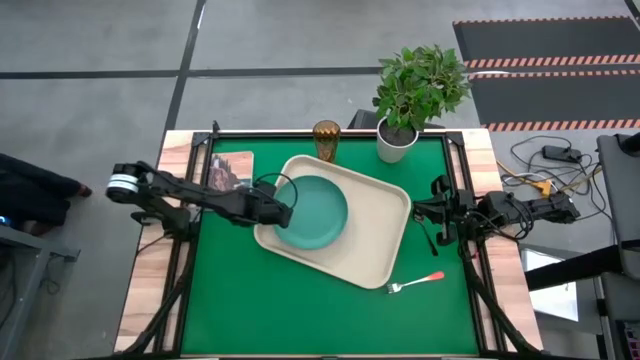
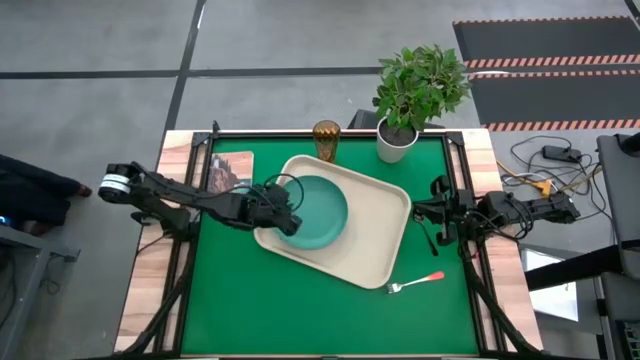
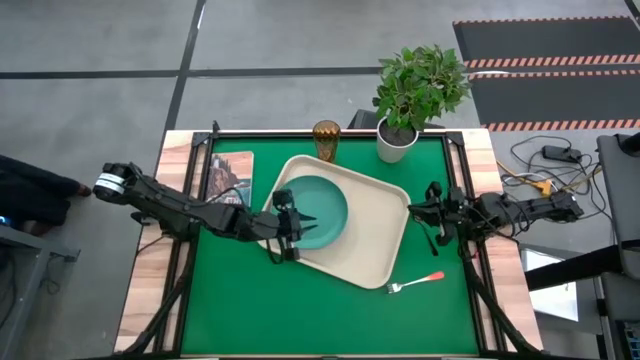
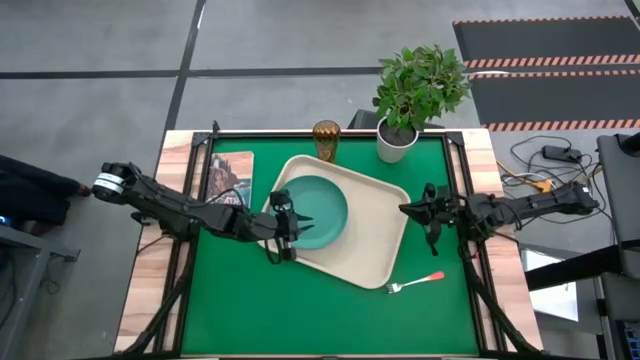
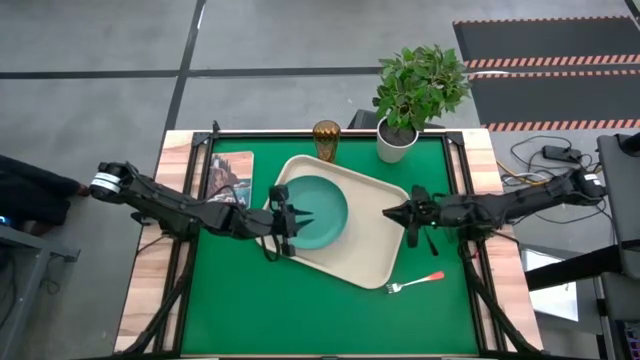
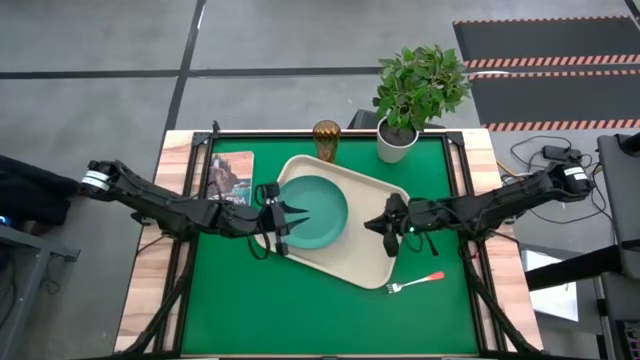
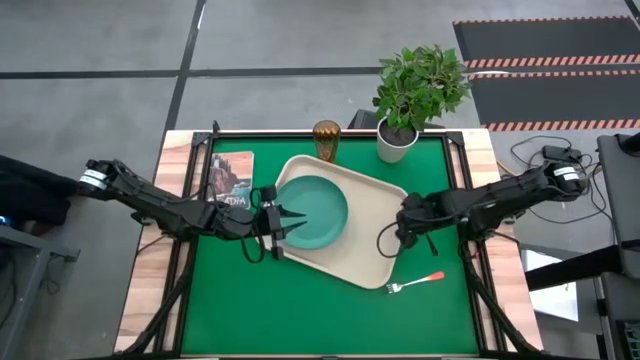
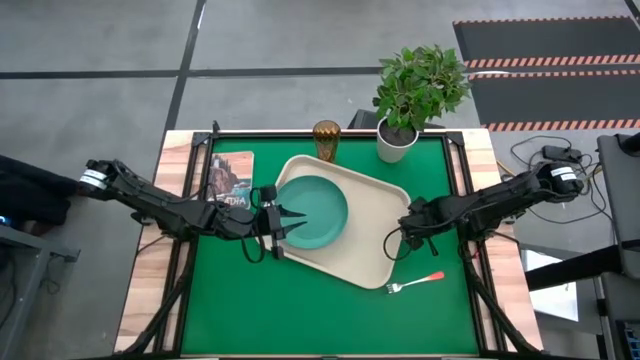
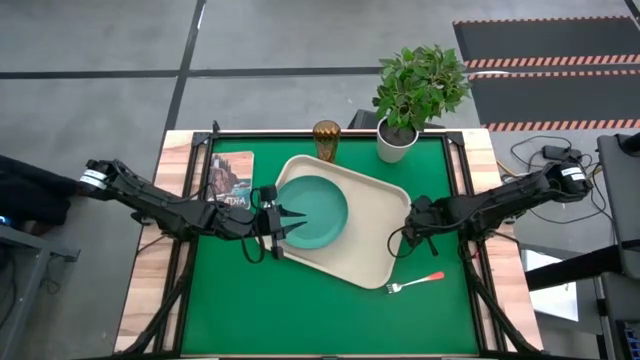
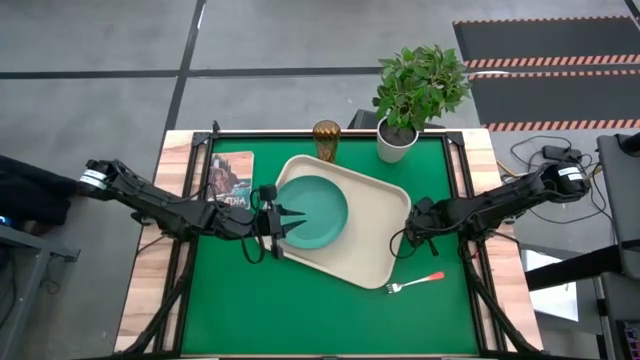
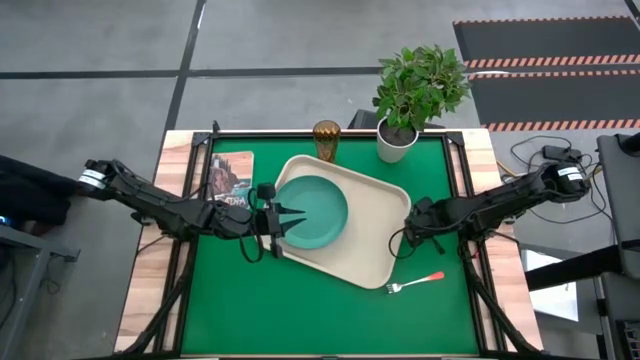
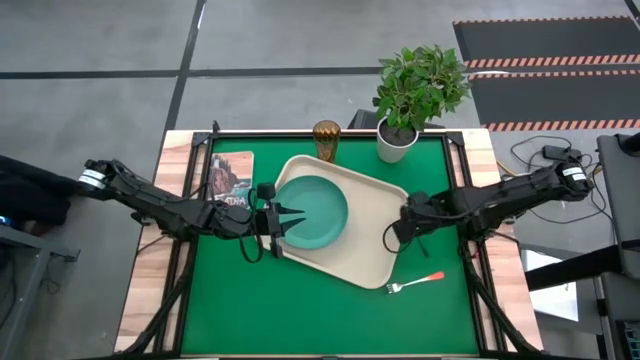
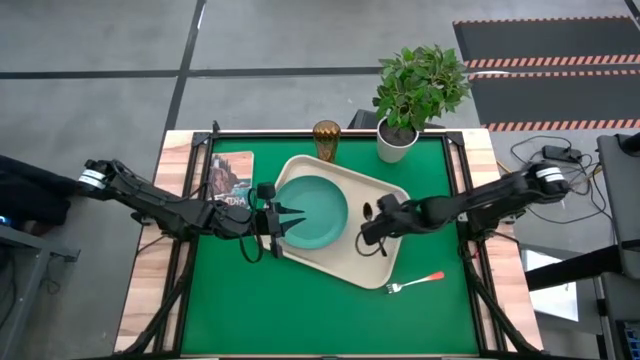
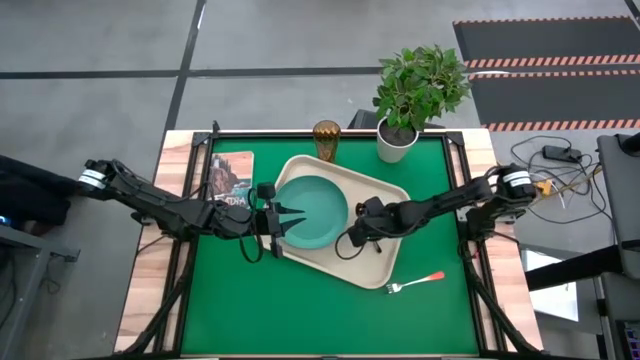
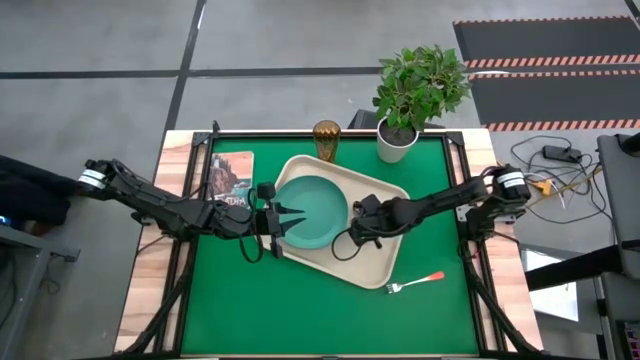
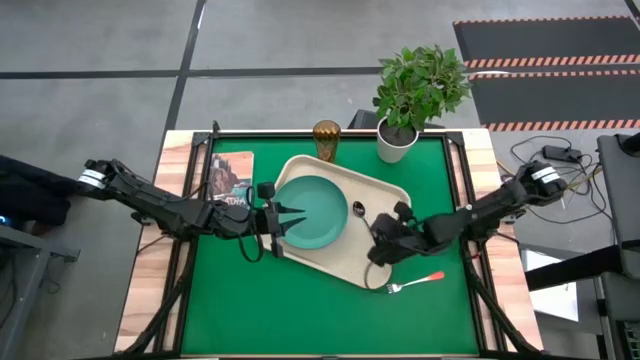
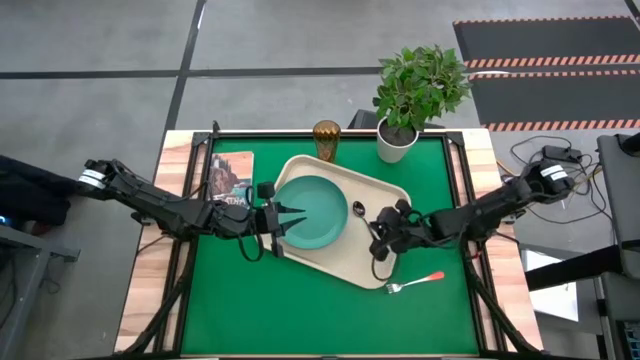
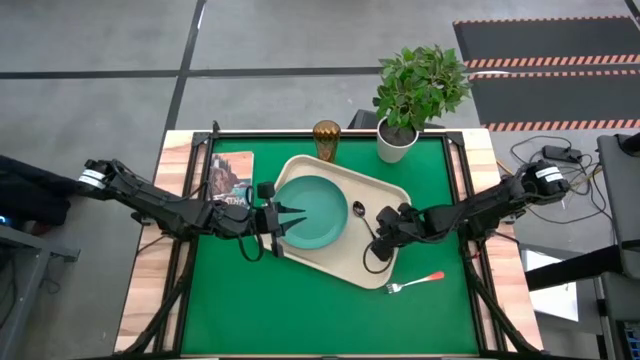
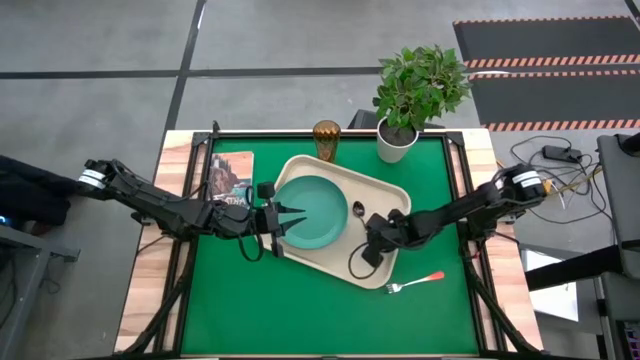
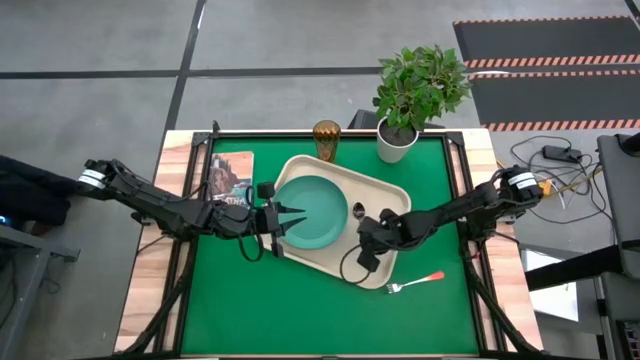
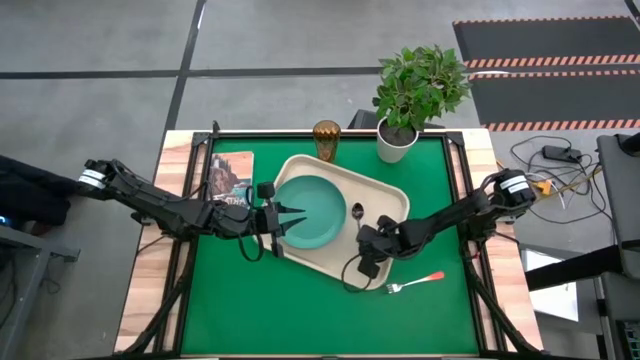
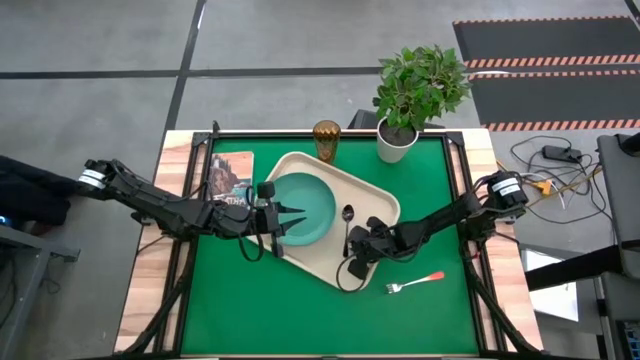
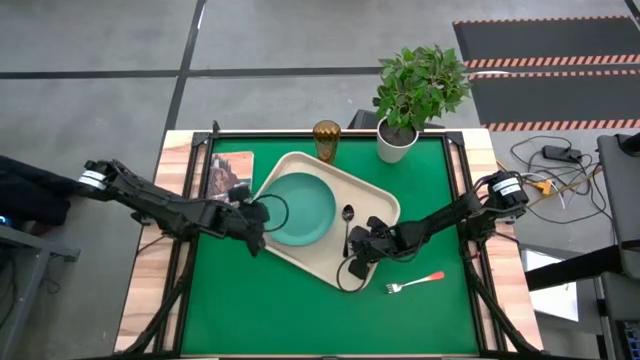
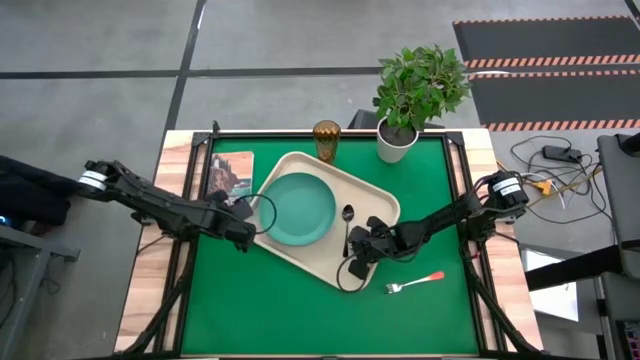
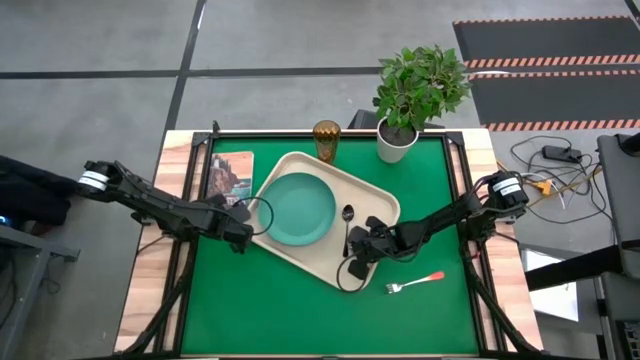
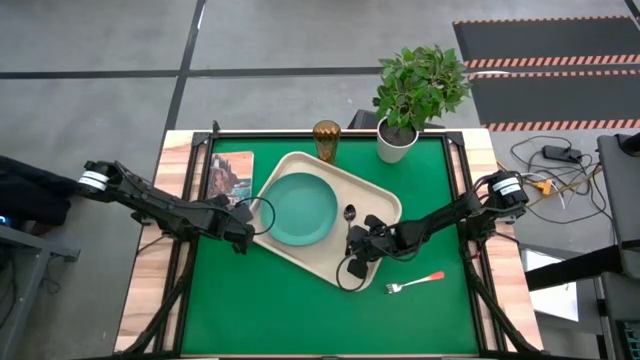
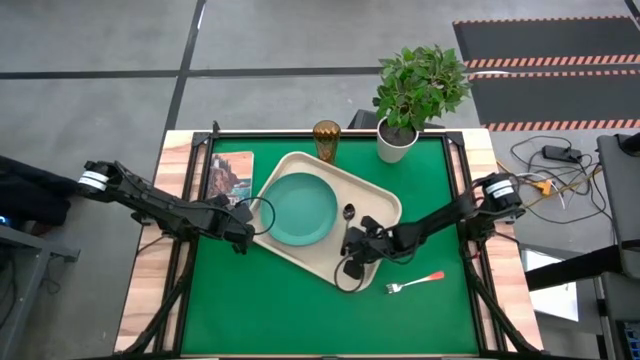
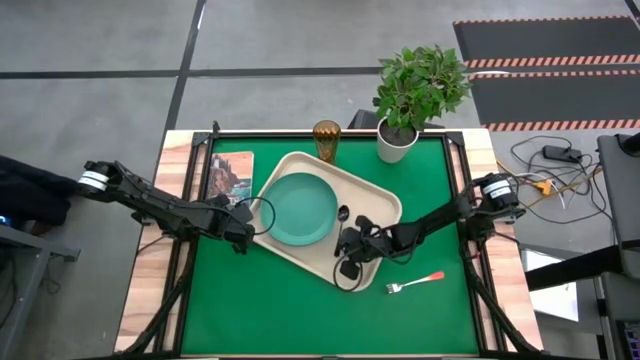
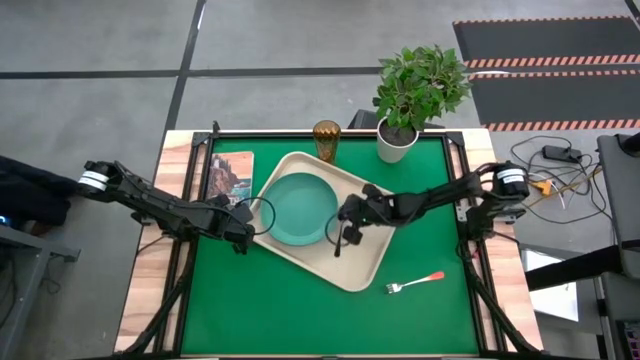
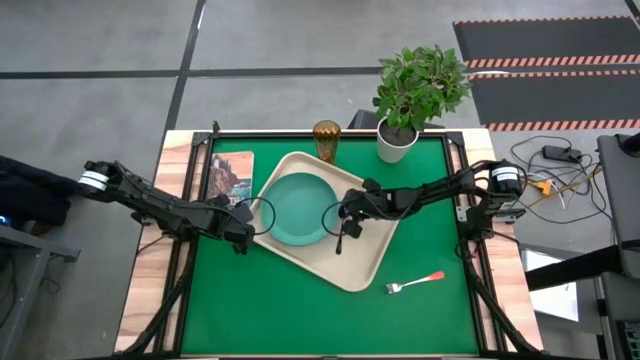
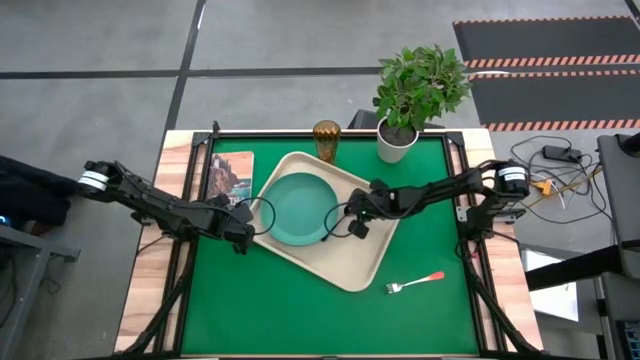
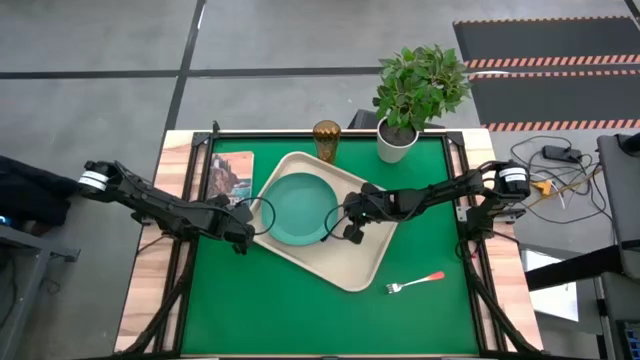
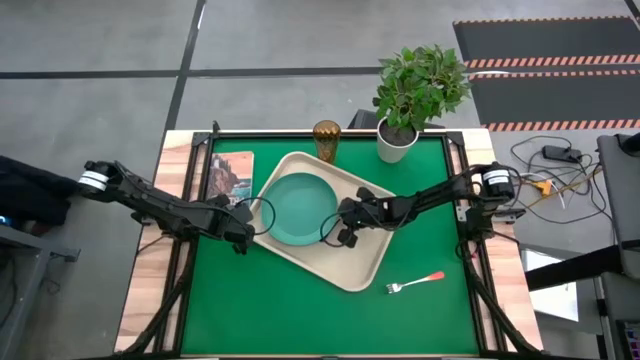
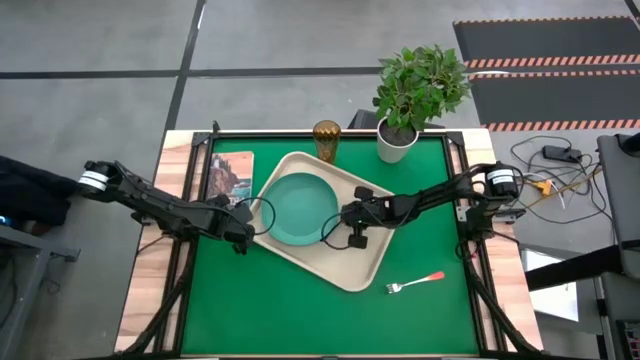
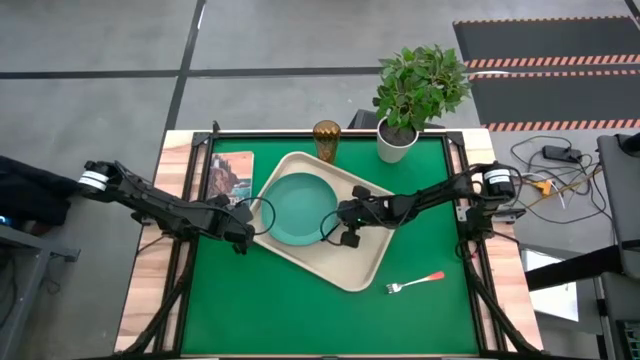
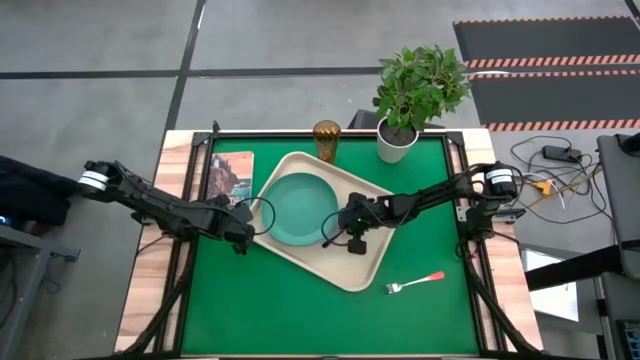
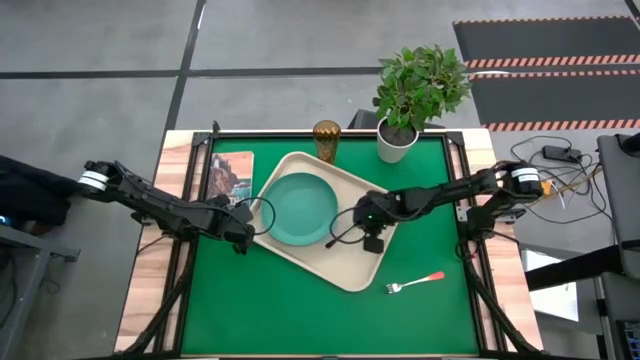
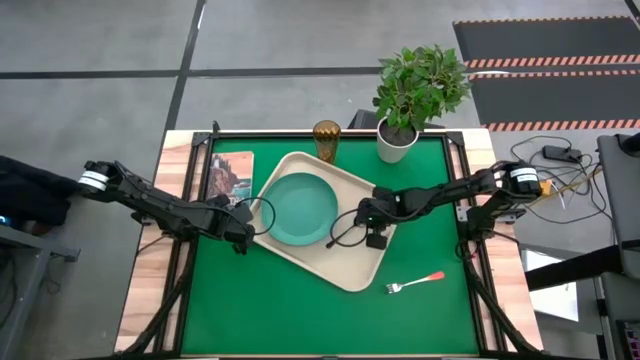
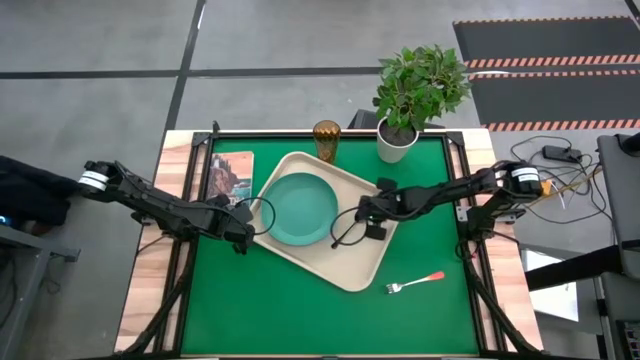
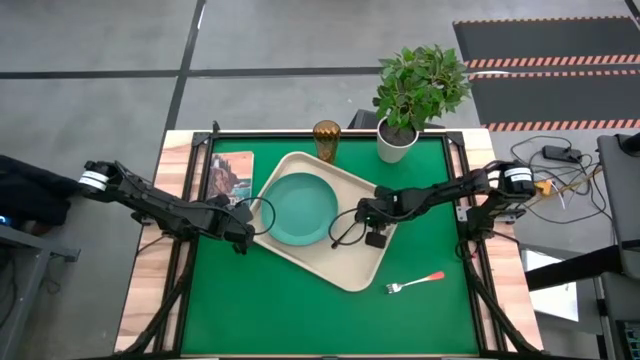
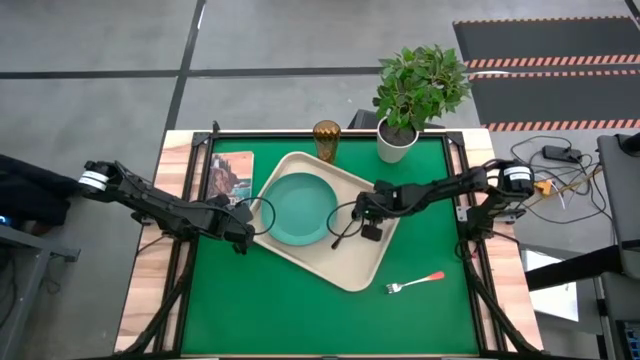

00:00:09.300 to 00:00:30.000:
Task: Pick and place plate/cup/fork/spoon on tray
Put the black spoon on the right side of the green plate
